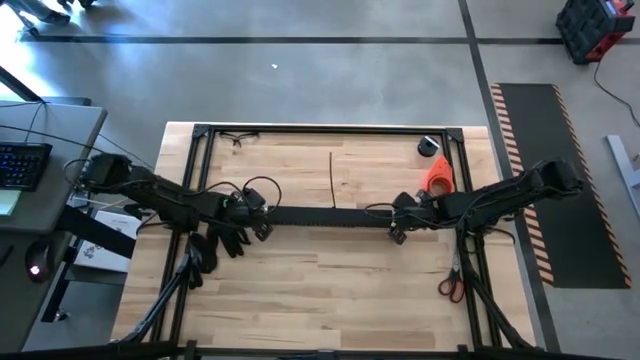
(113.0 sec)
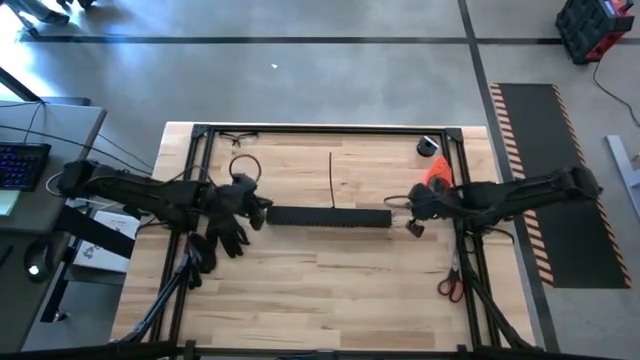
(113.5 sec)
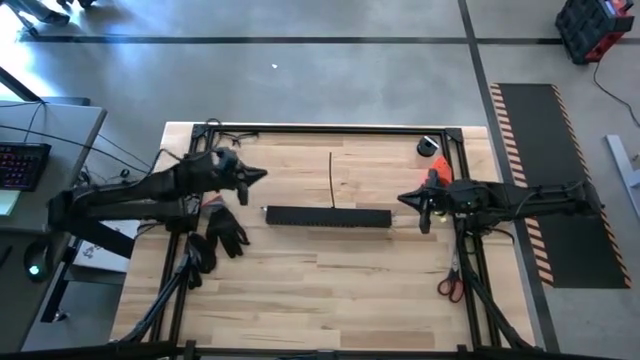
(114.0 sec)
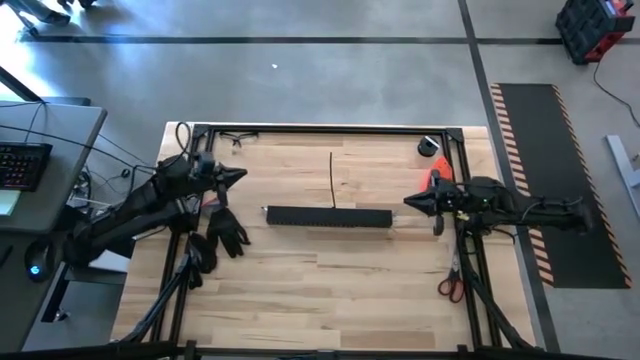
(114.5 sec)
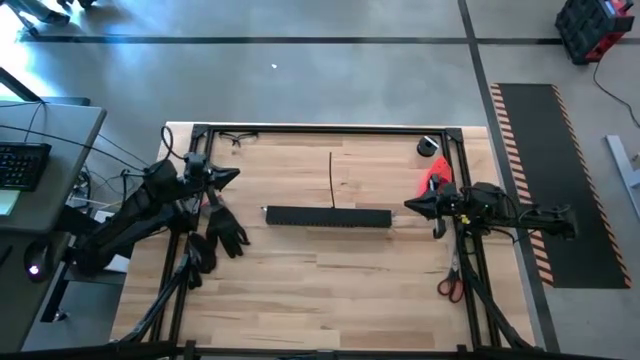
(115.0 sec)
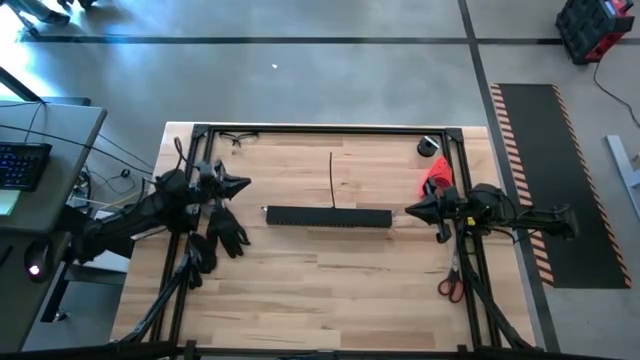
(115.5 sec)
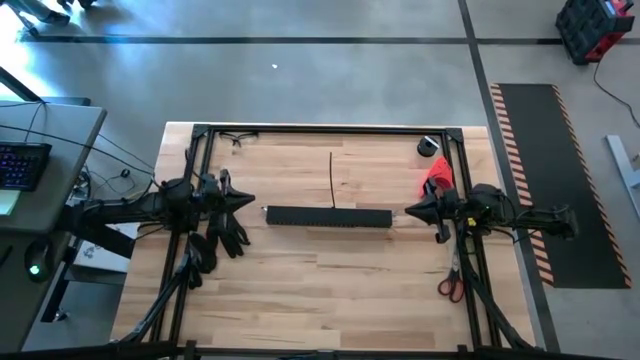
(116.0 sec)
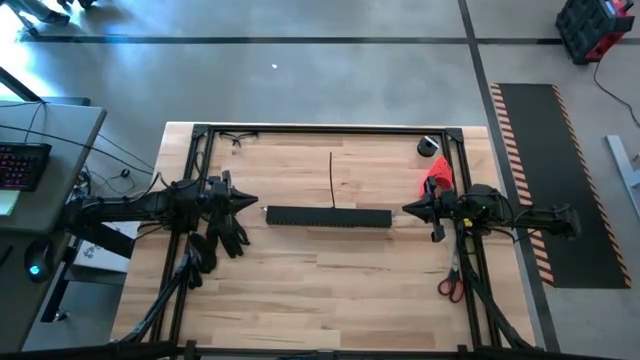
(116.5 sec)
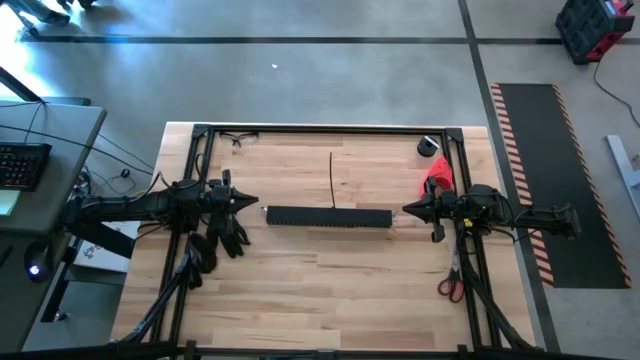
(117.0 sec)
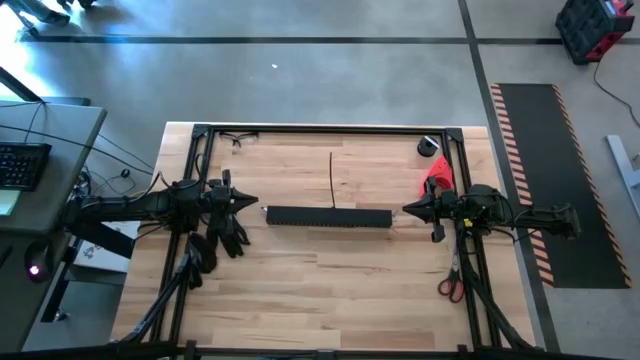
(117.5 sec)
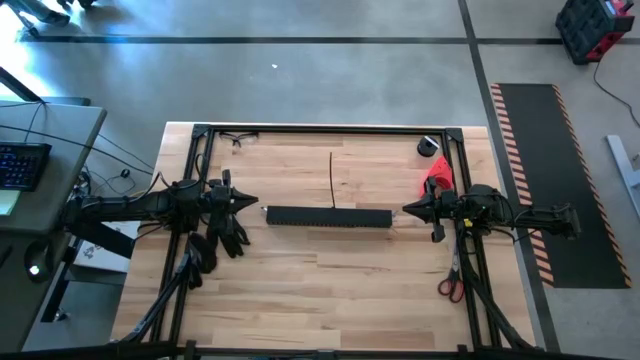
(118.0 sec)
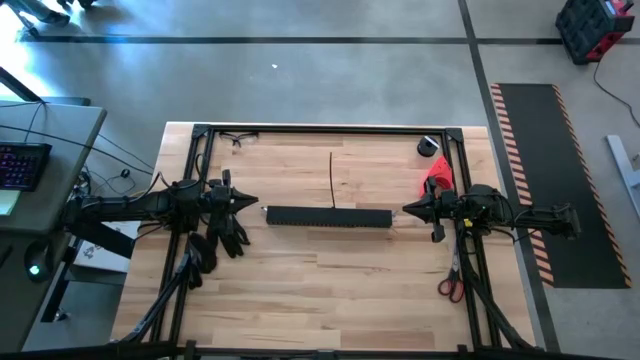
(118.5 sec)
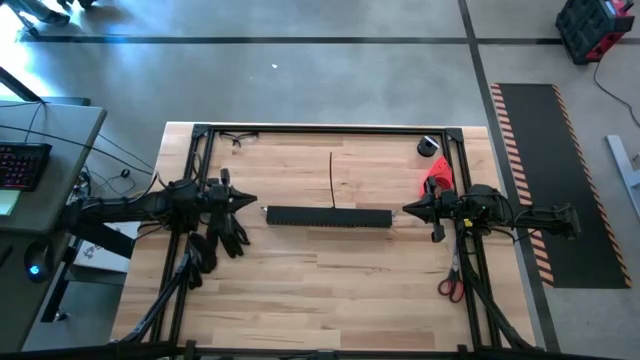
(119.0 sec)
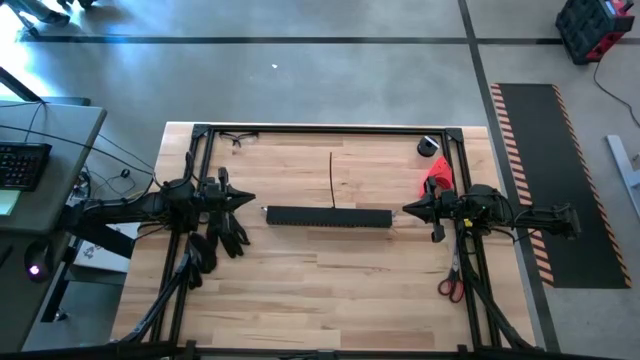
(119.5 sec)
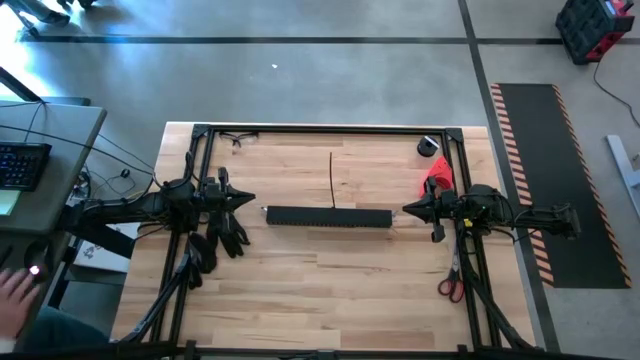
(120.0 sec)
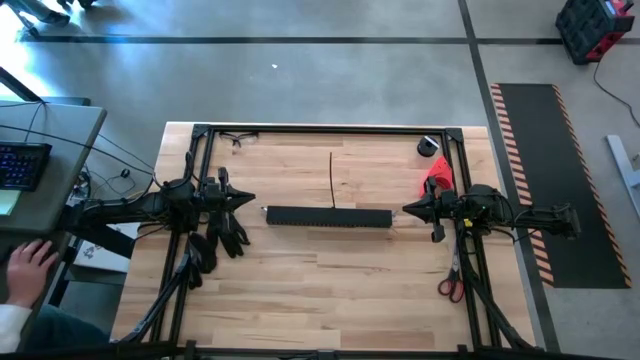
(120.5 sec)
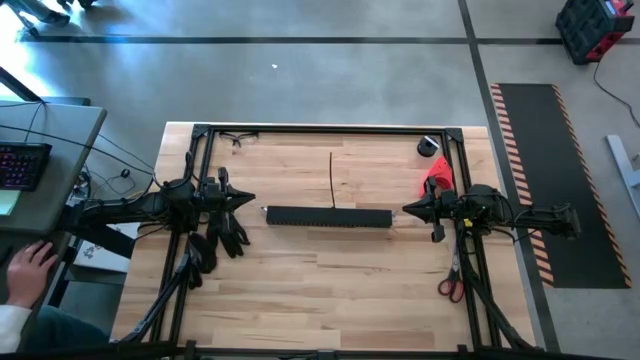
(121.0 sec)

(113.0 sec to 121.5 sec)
Task: Ziptie cables
Return to Home Position

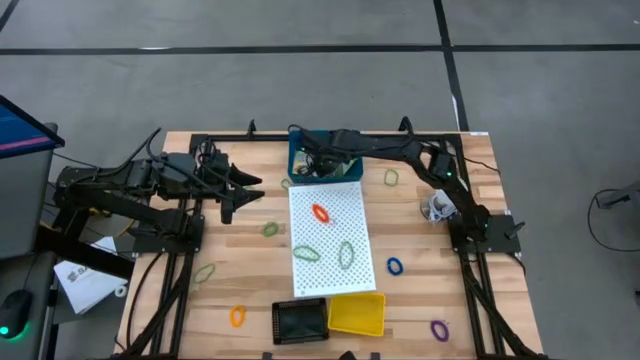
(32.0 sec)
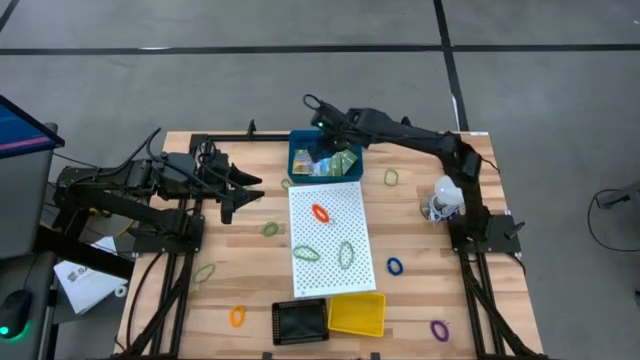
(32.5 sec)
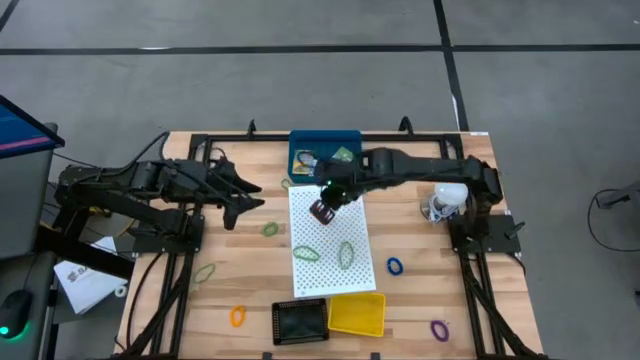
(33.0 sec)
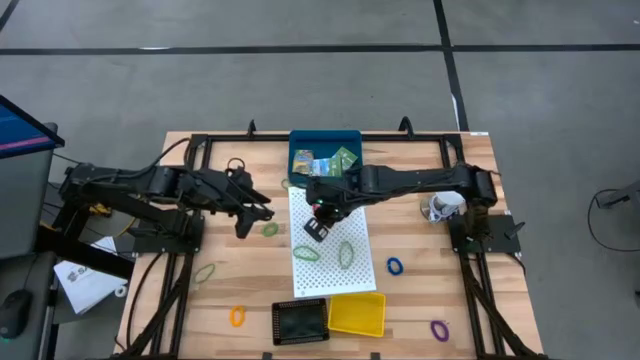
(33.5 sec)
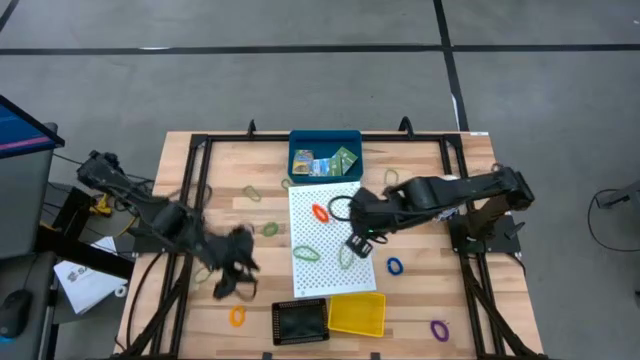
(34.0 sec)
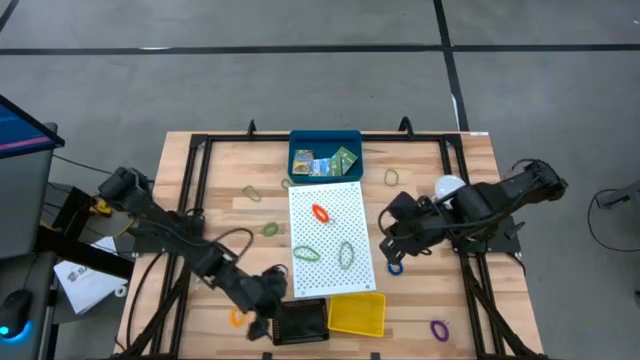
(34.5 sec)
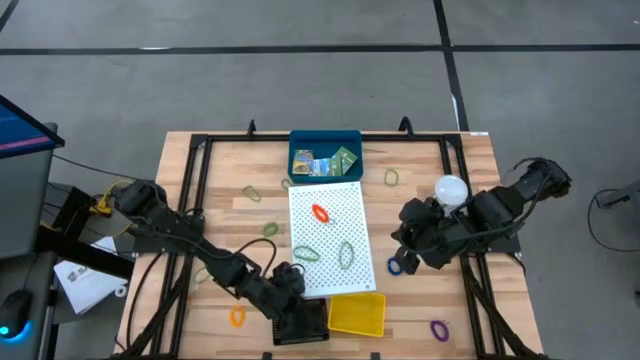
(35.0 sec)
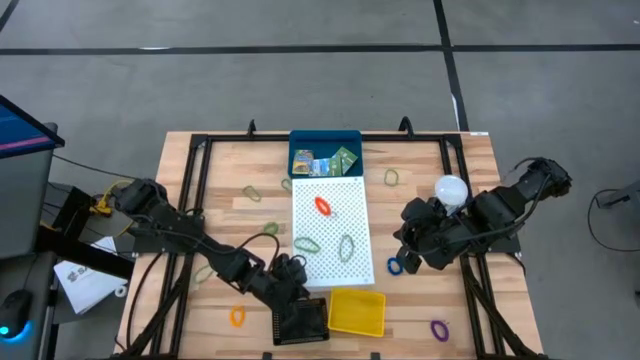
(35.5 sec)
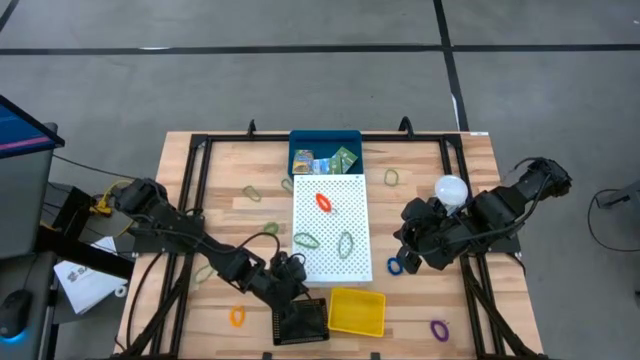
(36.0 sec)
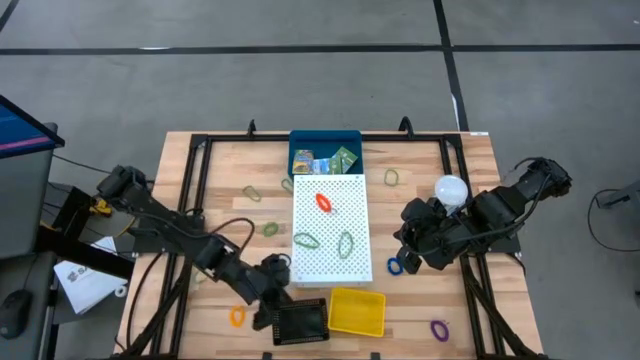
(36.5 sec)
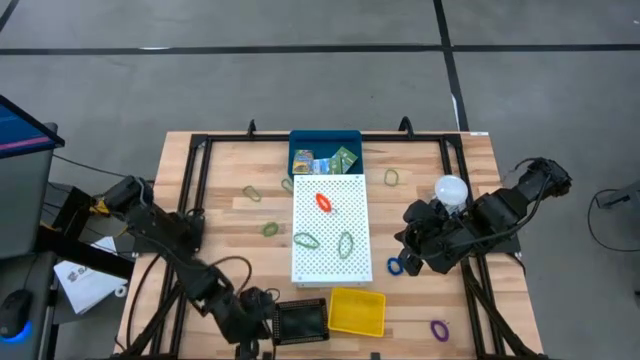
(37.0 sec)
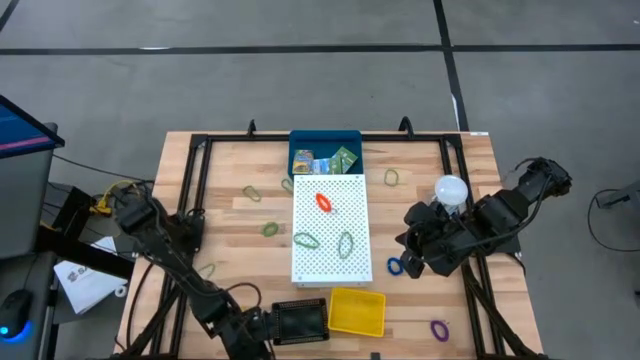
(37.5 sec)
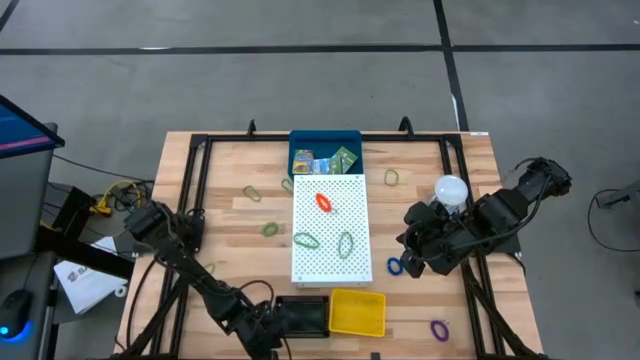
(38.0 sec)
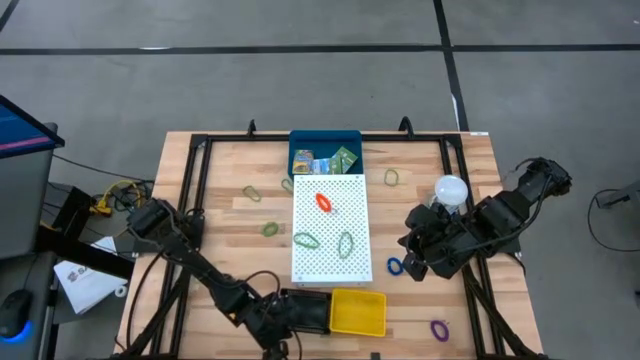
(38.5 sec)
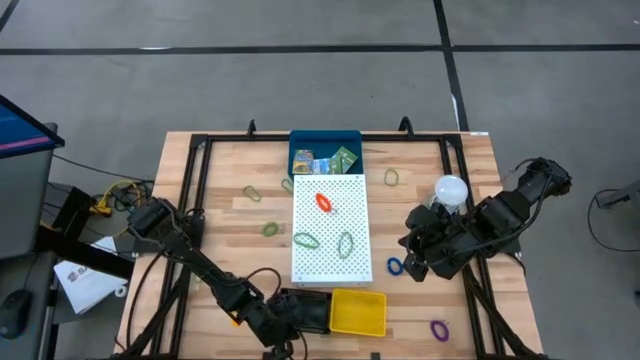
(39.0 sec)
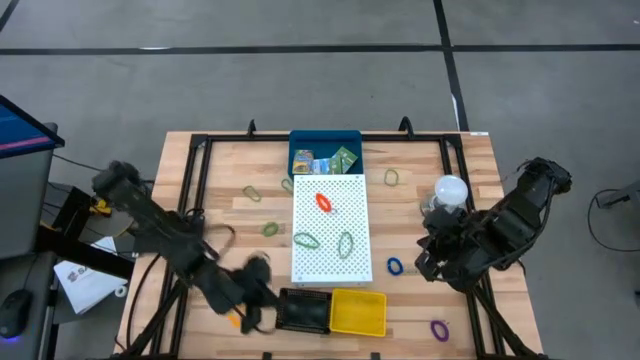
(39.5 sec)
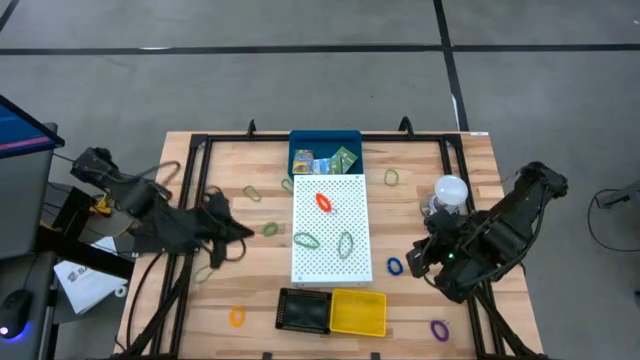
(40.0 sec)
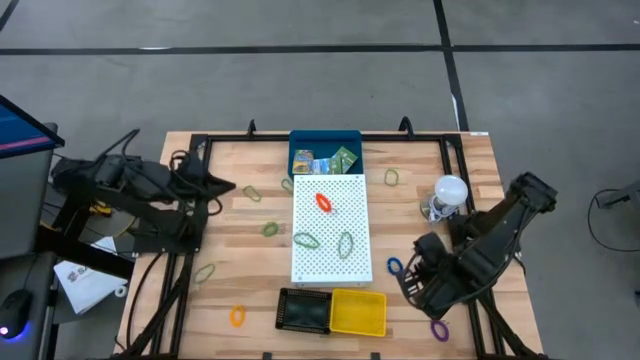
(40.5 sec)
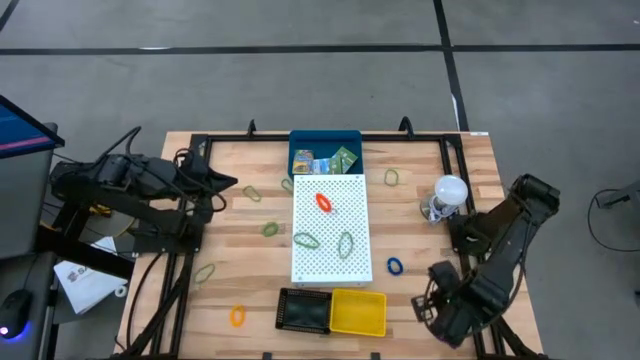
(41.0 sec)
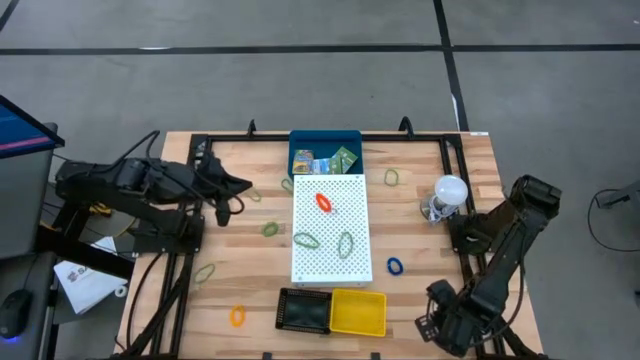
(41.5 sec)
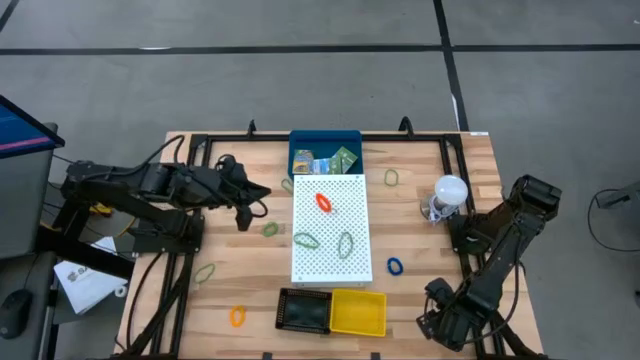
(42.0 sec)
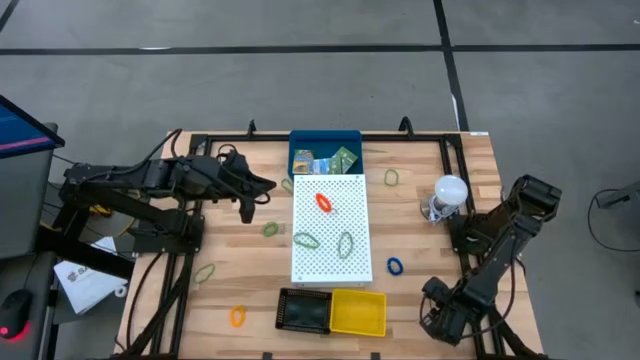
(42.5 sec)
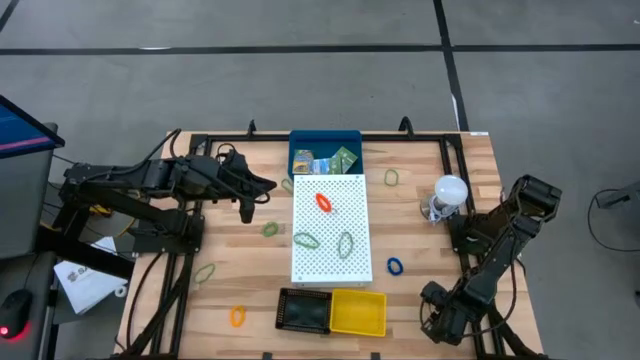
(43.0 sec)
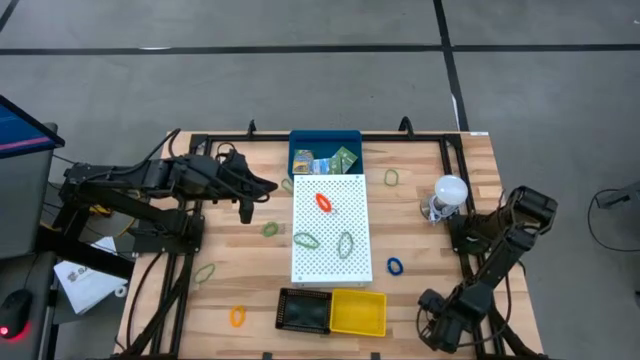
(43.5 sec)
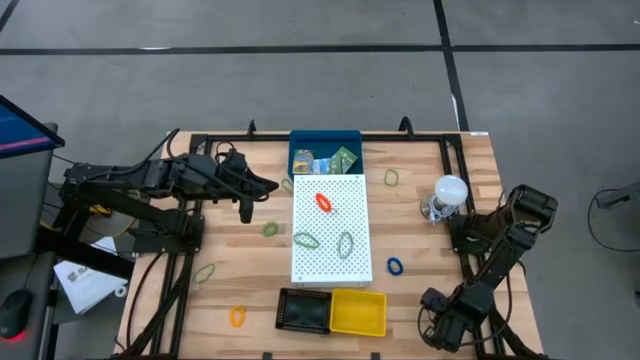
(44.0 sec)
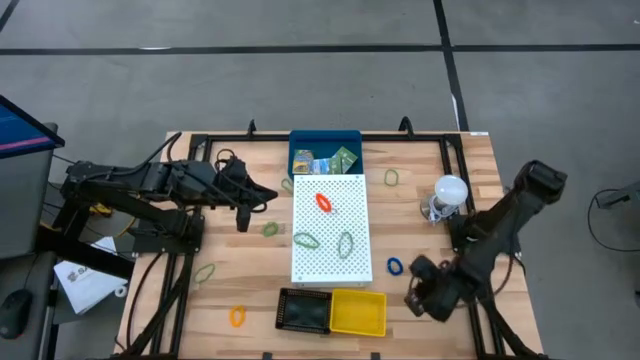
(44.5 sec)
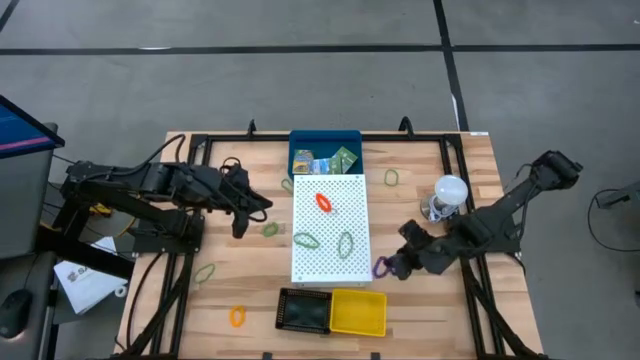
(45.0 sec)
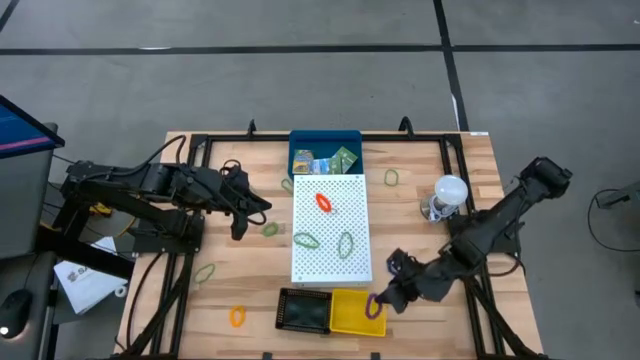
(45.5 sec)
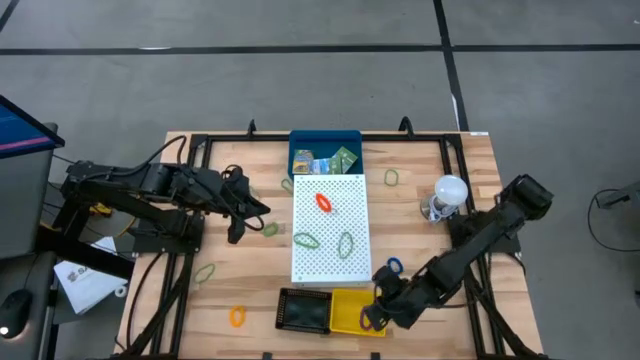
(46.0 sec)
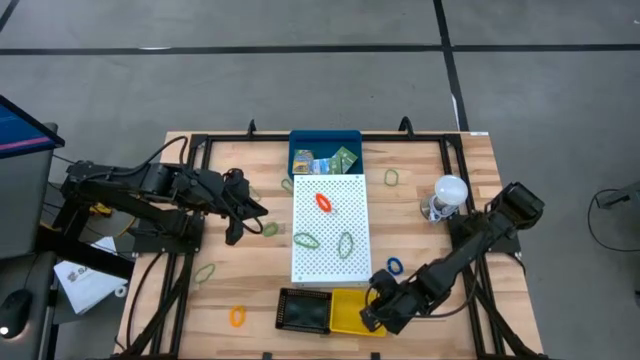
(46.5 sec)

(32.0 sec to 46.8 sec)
Task: Pick & Place Office Desk Supplies
Put the purple spring keychain into the yellow bin
